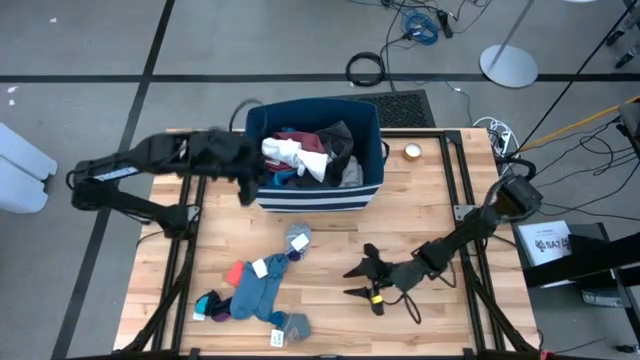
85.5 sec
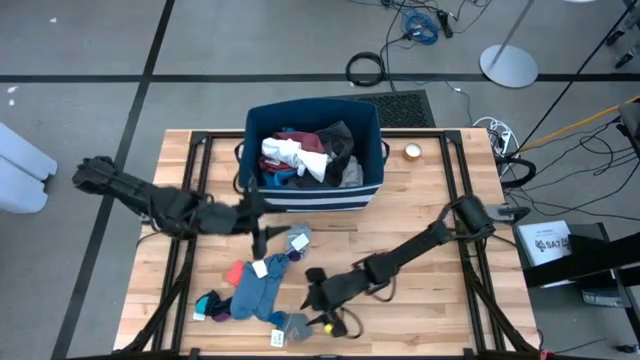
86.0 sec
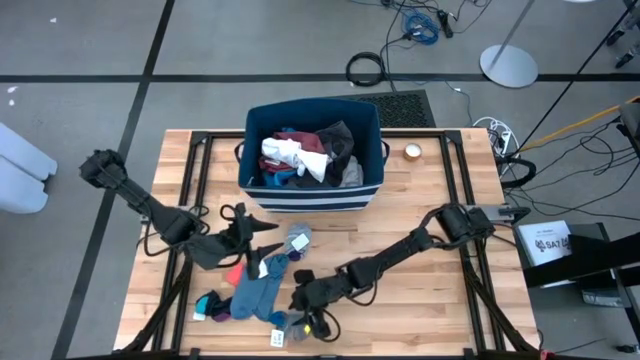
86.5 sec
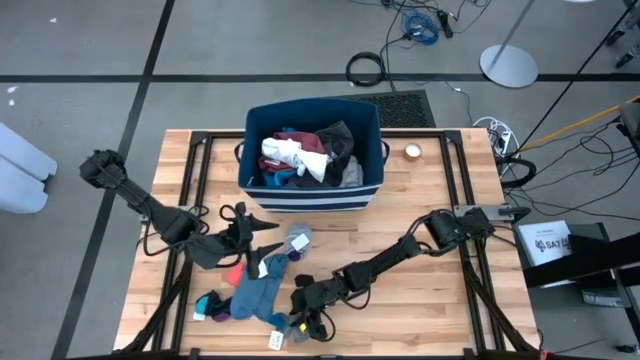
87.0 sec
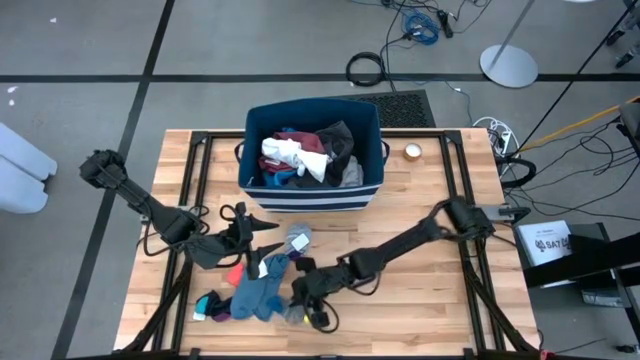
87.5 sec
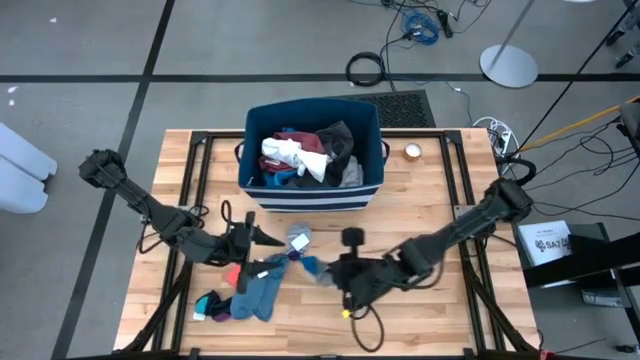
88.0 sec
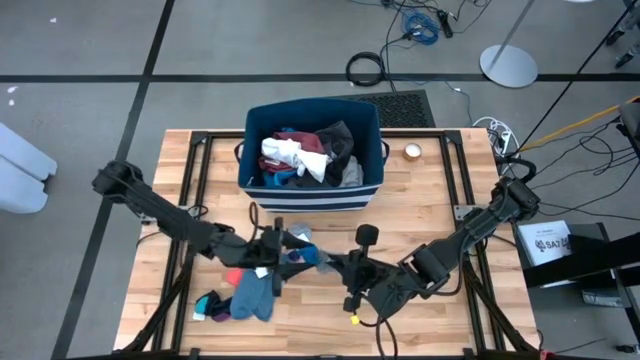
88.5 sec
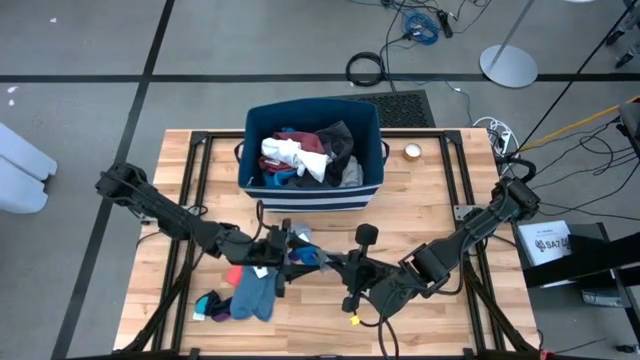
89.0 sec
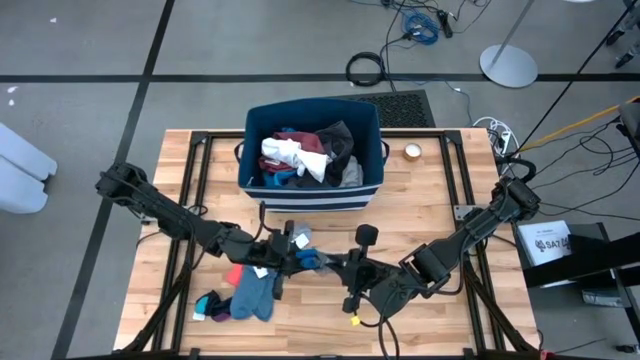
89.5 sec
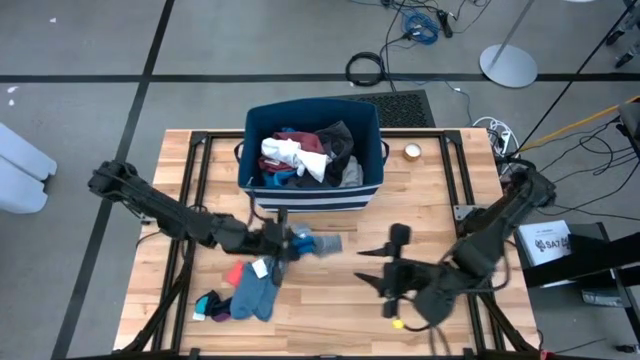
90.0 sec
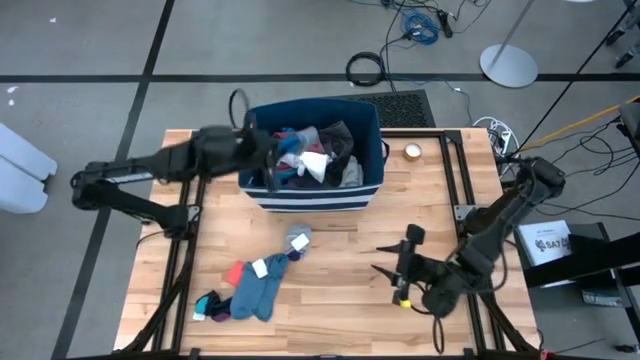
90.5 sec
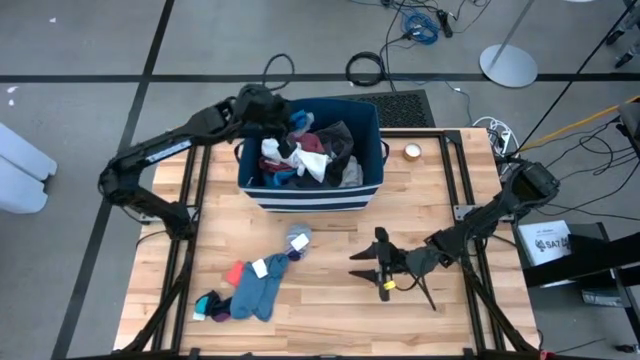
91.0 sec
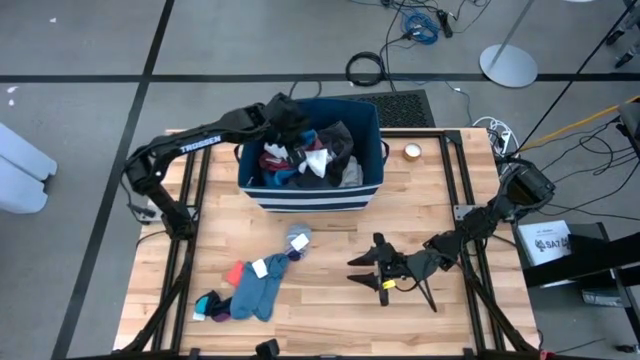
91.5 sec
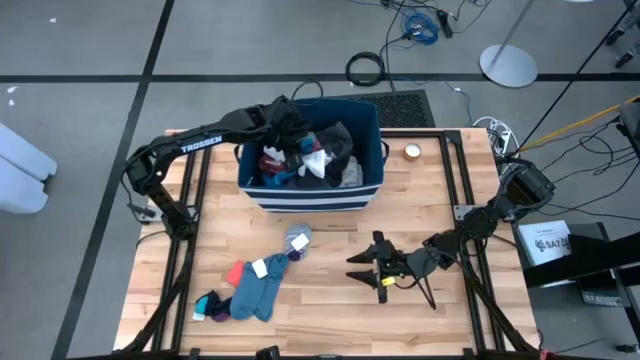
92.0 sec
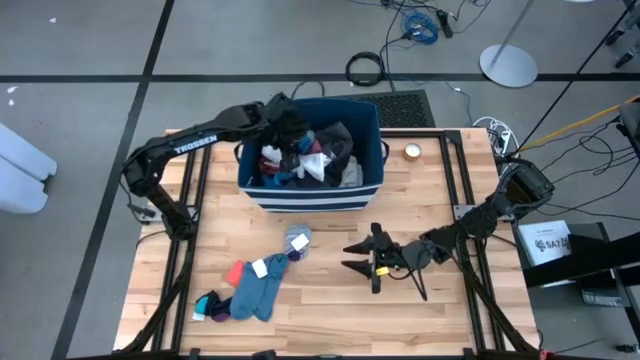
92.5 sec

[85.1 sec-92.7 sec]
Task: Sort clothes
Put the gray sock into the blue bin

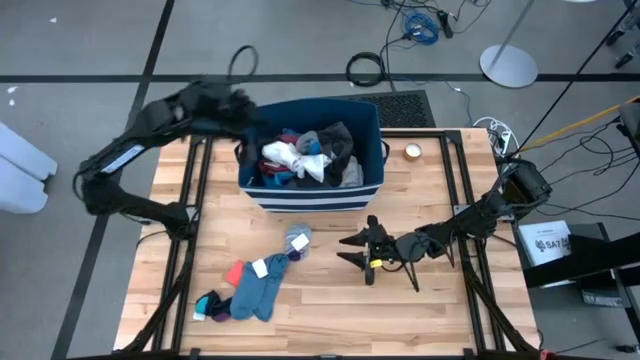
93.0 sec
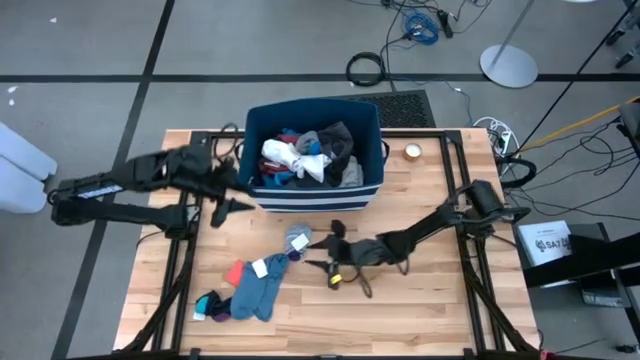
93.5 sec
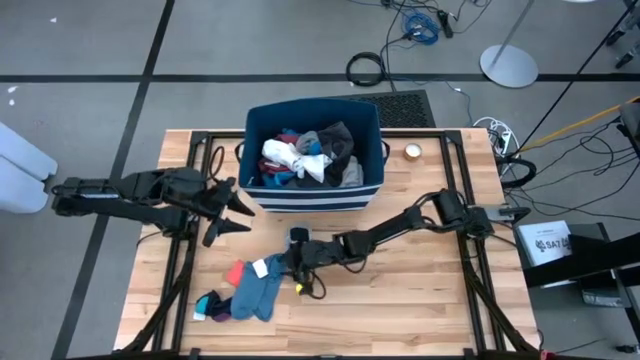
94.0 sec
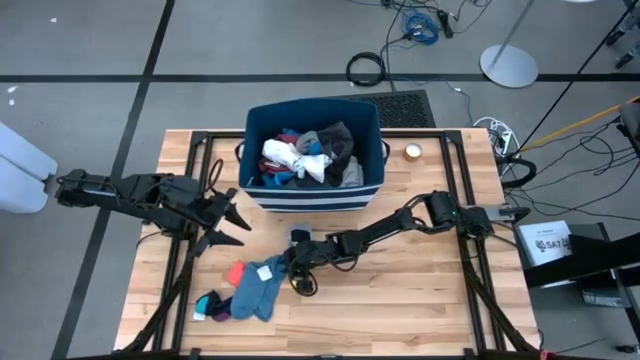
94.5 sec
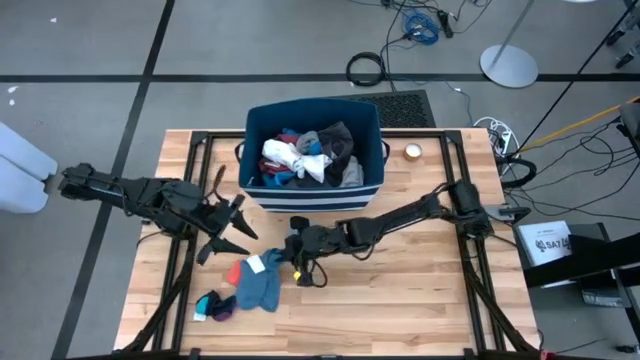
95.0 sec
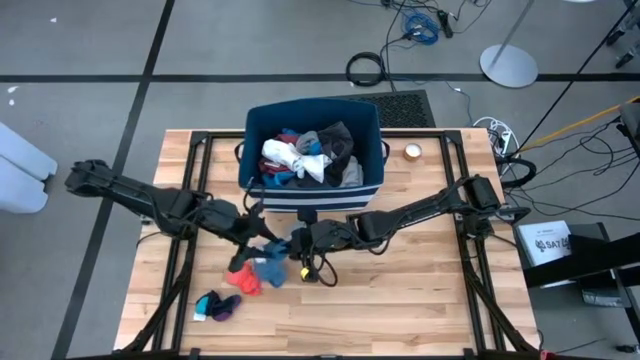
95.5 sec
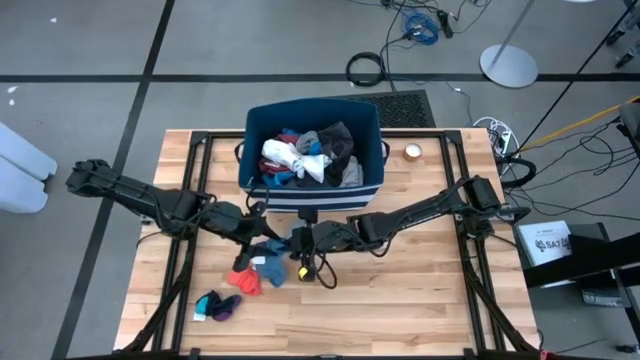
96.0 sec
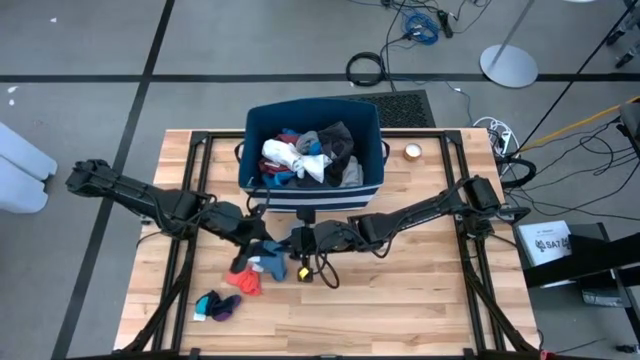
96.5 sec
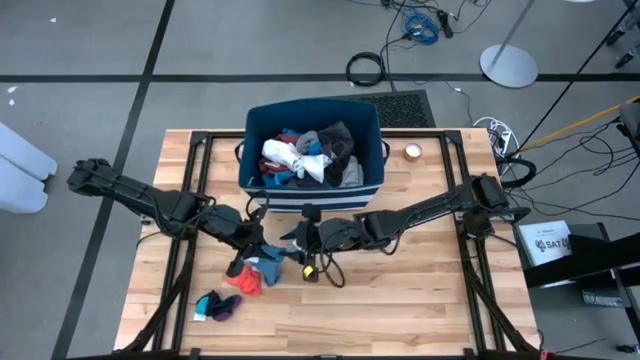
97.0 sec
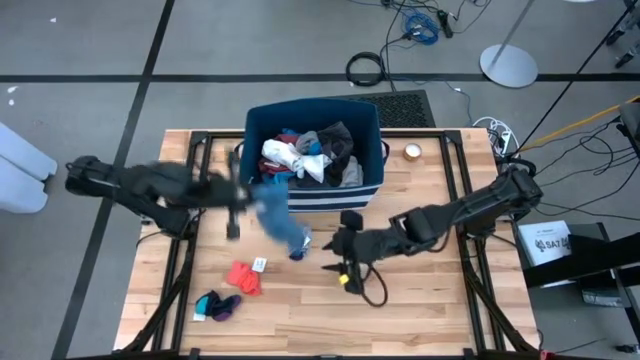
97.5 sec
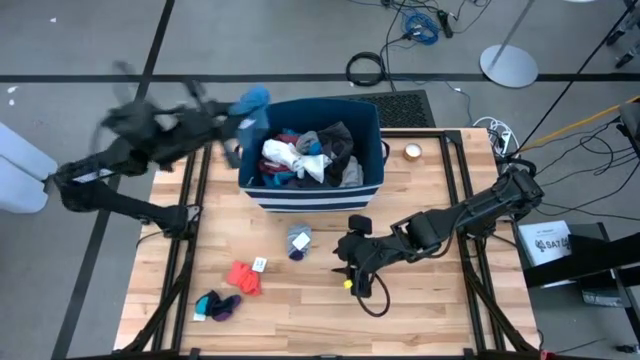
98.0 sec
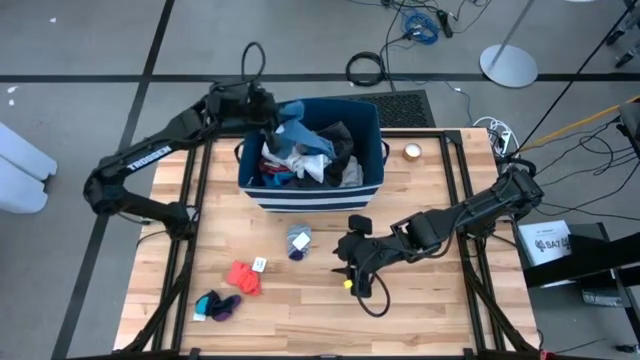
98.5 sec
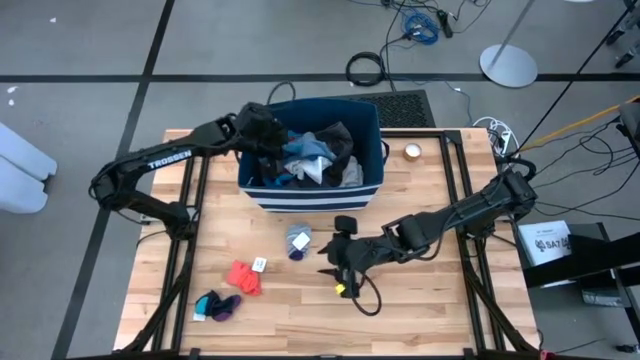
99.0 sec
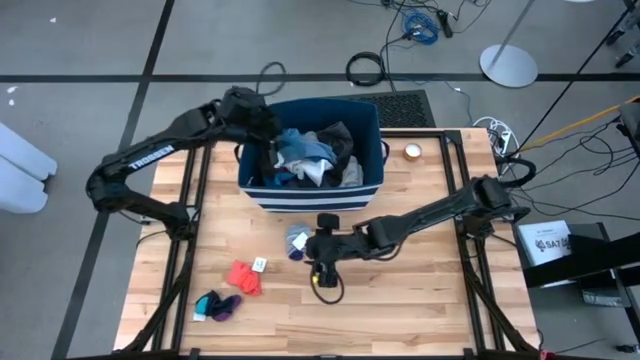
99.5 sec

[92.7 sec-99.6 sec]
Put the blue sock into the blue bin

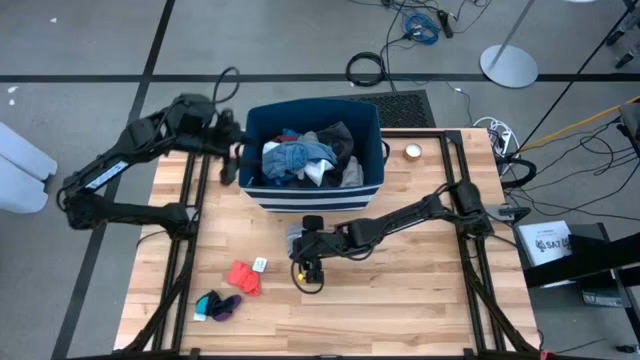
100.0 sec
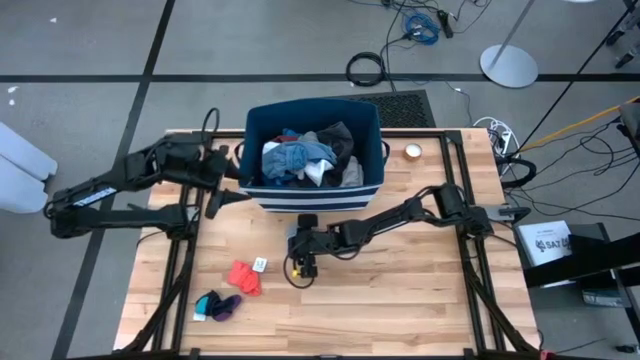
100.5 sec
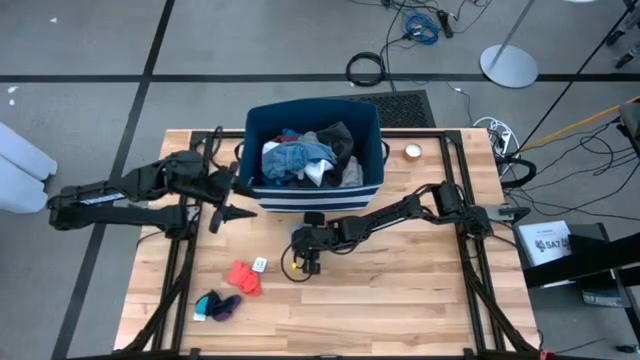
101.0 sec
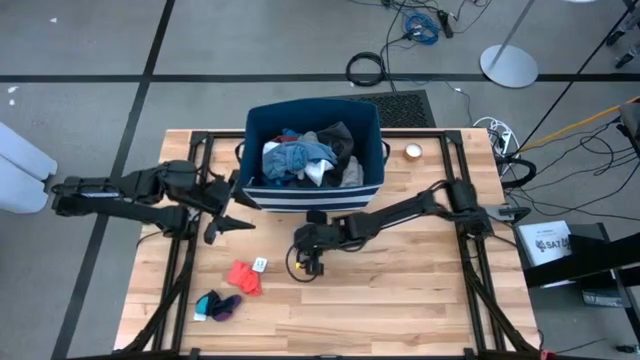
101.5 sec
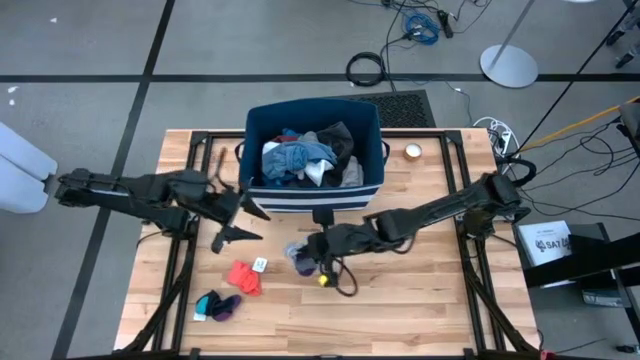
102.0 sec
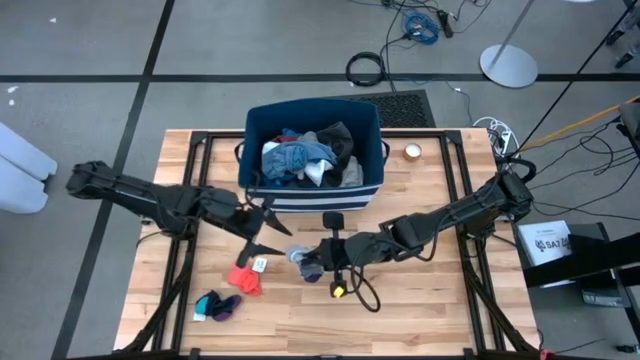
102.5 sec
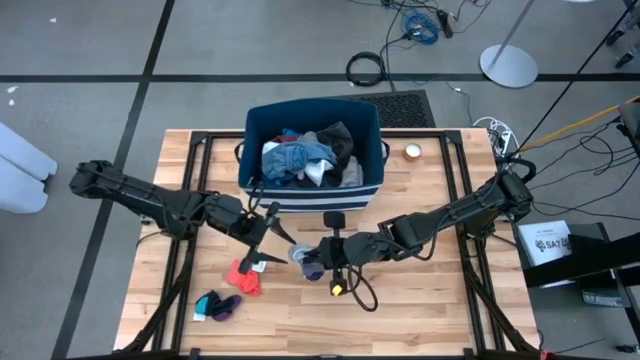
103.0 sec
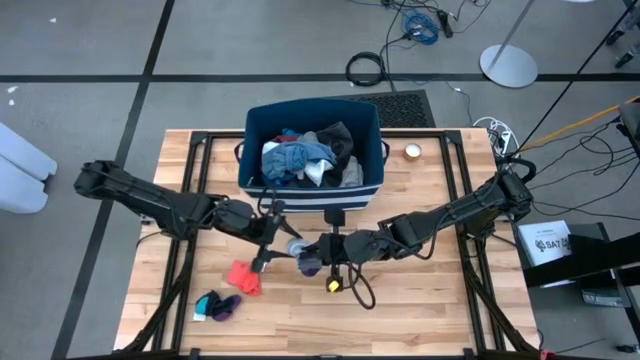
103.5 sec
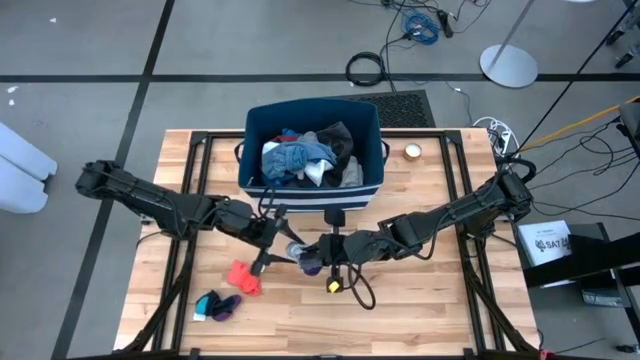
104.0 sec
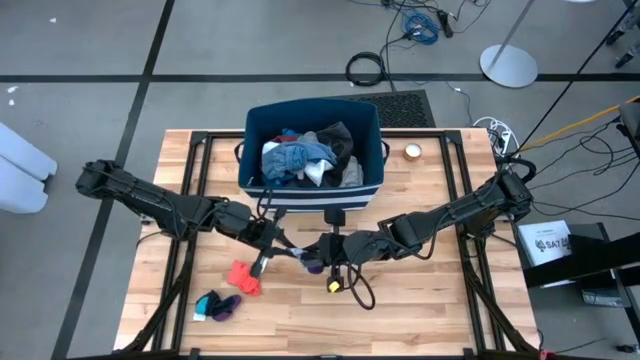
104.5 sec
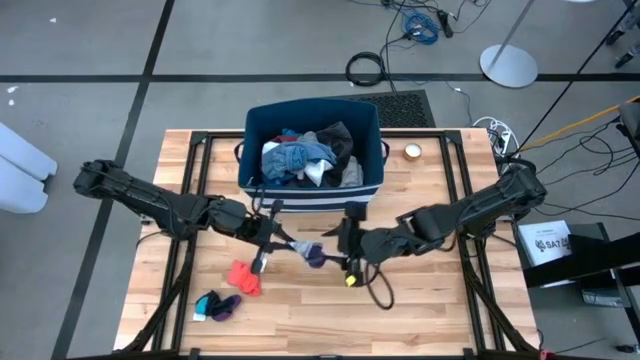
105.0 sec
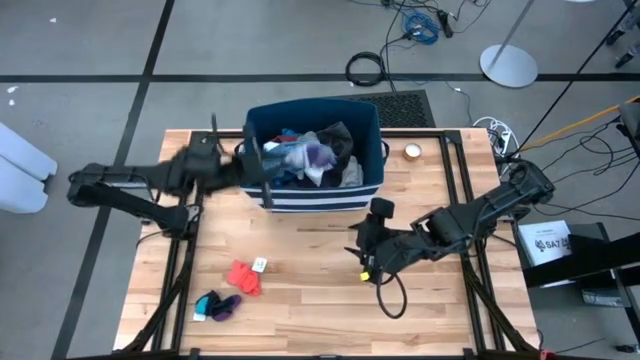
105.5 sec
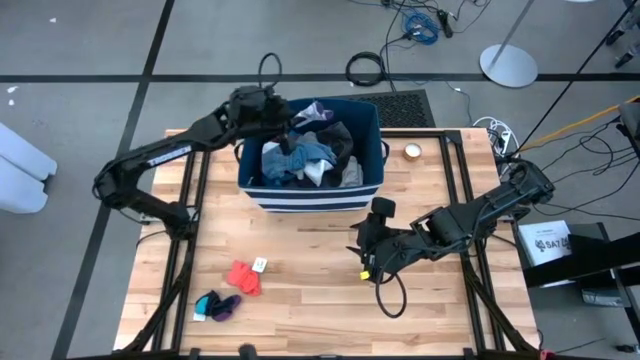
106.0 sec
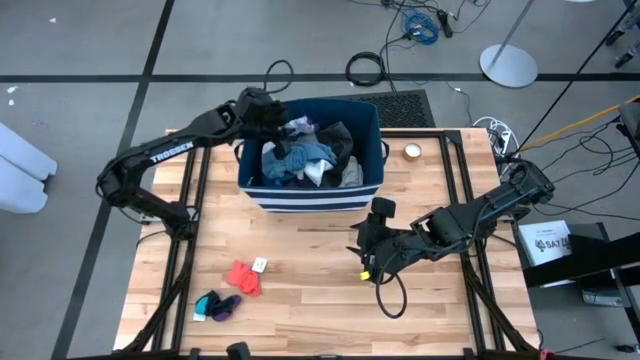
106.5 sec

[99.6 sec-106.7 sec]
Put the light gray sock into the blue bin
